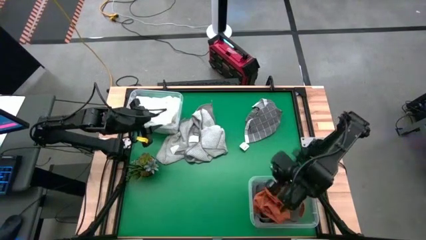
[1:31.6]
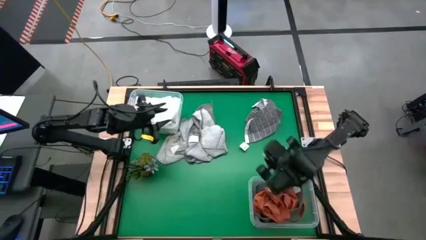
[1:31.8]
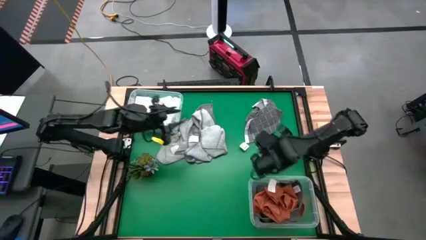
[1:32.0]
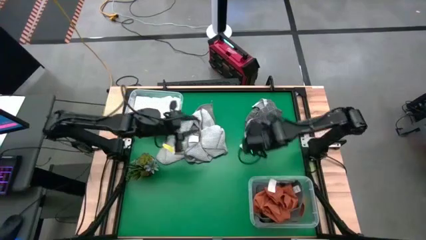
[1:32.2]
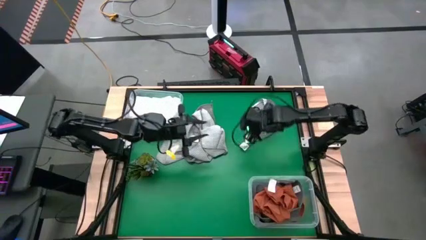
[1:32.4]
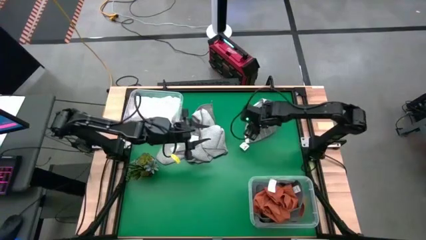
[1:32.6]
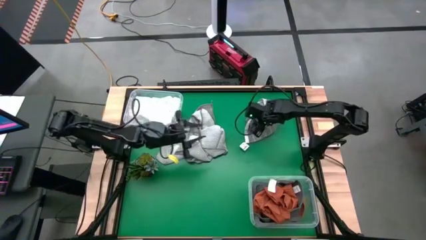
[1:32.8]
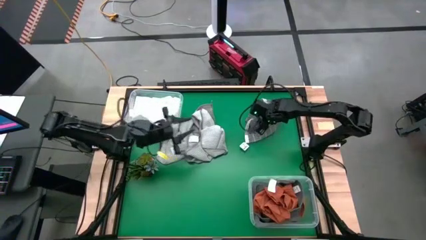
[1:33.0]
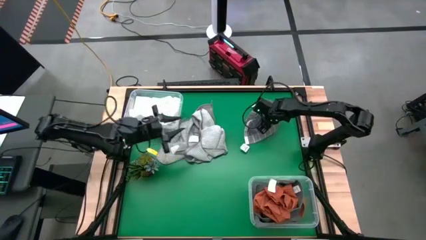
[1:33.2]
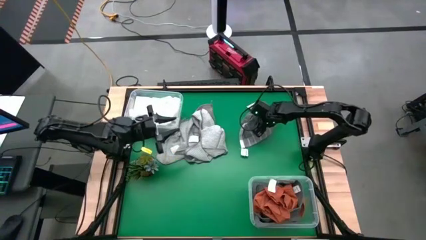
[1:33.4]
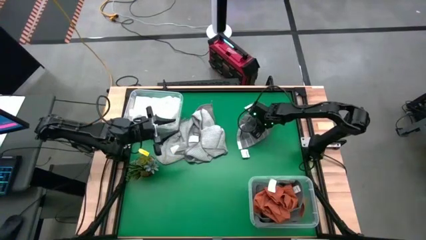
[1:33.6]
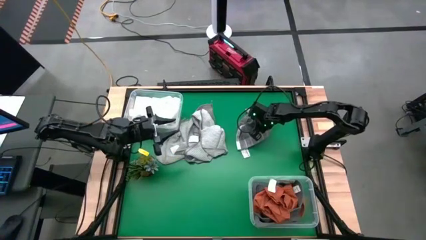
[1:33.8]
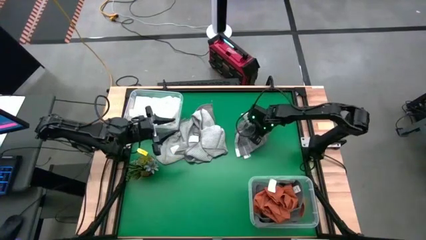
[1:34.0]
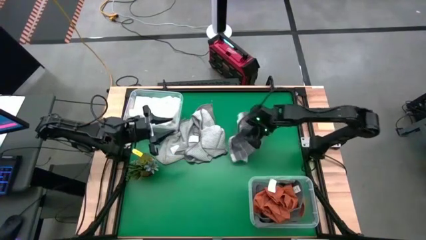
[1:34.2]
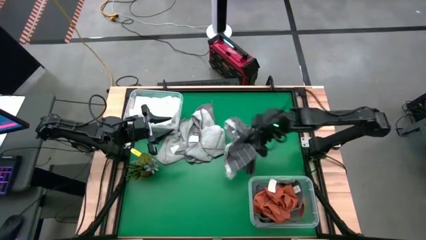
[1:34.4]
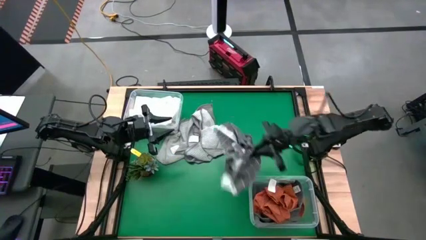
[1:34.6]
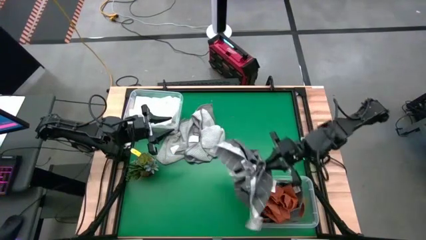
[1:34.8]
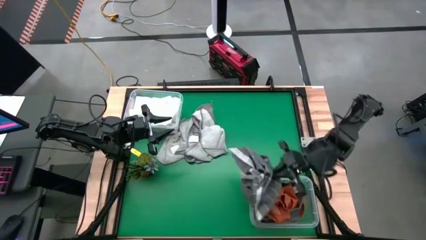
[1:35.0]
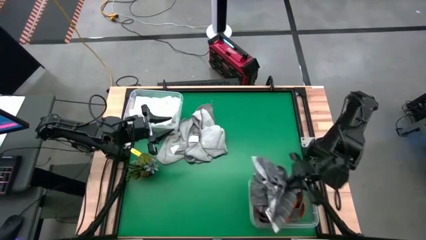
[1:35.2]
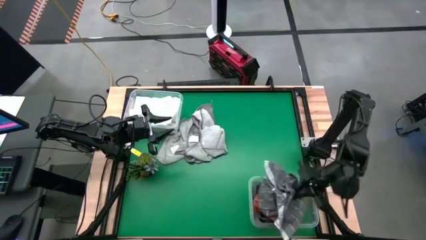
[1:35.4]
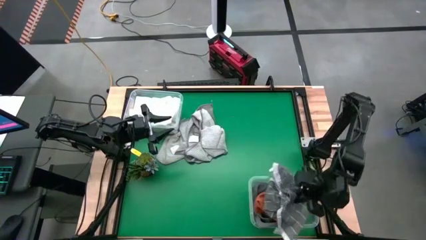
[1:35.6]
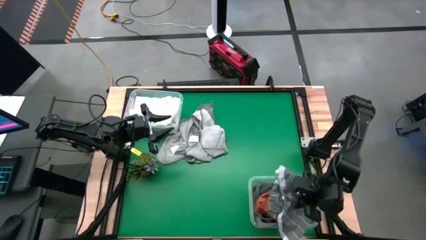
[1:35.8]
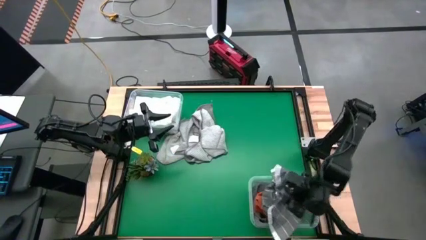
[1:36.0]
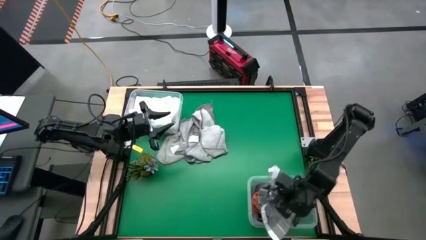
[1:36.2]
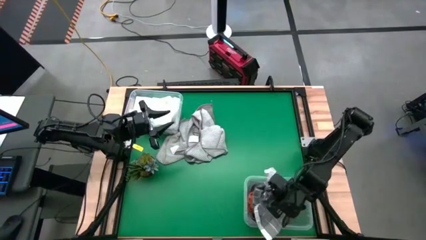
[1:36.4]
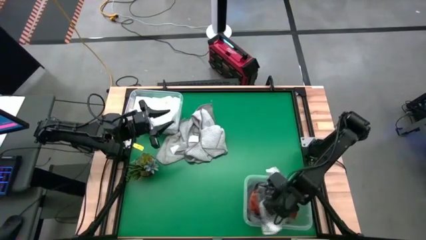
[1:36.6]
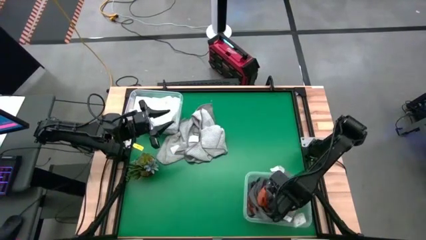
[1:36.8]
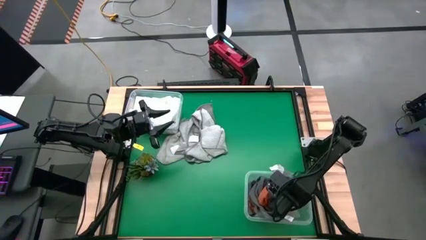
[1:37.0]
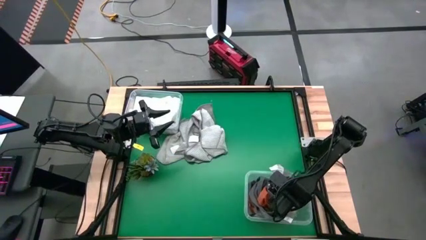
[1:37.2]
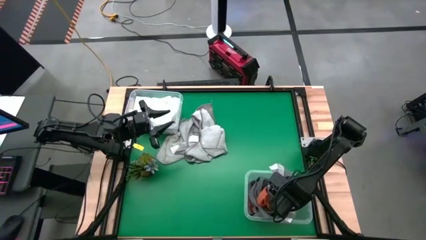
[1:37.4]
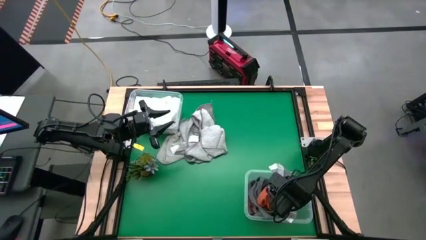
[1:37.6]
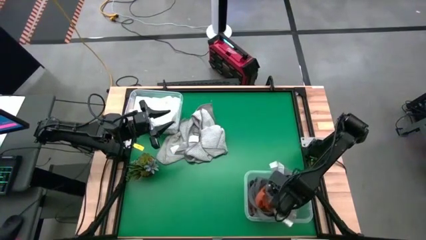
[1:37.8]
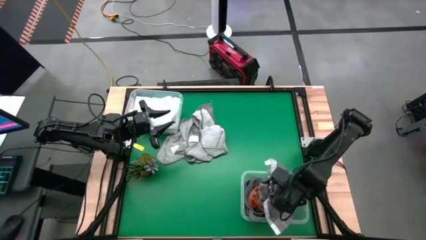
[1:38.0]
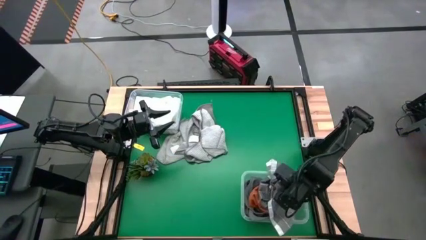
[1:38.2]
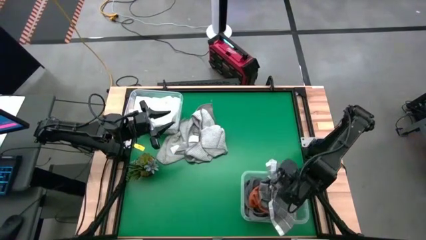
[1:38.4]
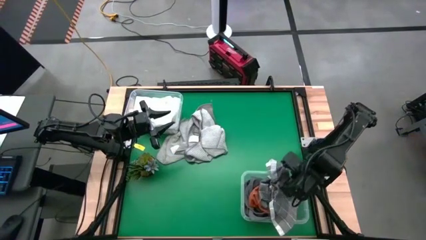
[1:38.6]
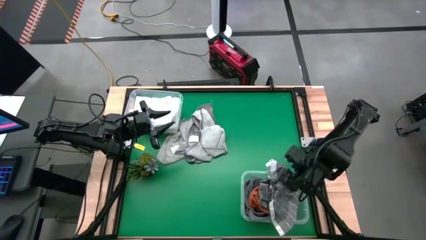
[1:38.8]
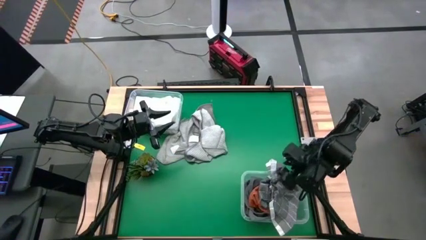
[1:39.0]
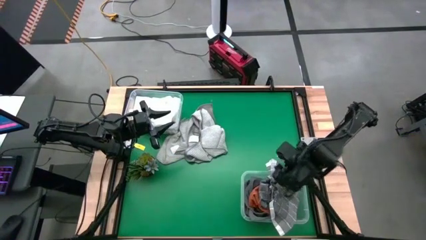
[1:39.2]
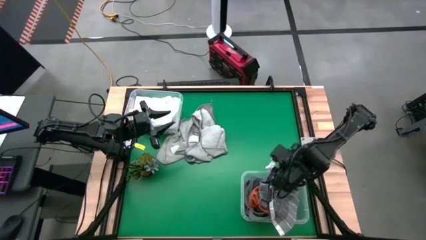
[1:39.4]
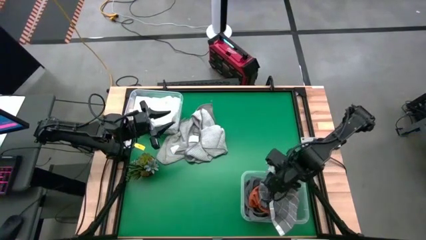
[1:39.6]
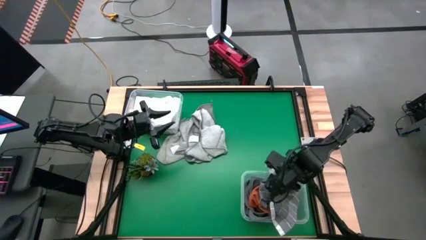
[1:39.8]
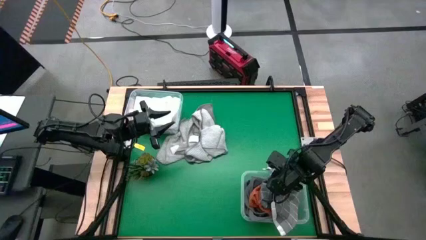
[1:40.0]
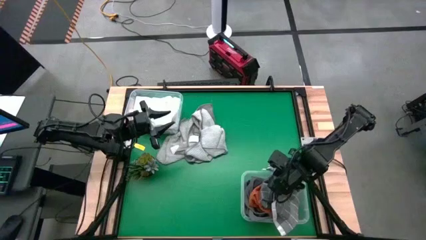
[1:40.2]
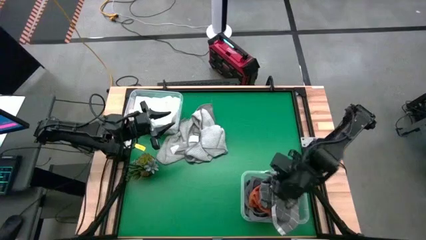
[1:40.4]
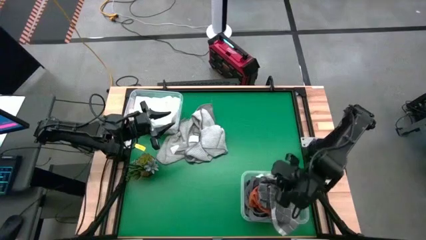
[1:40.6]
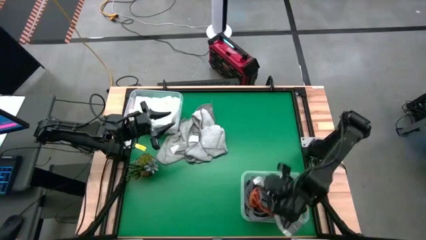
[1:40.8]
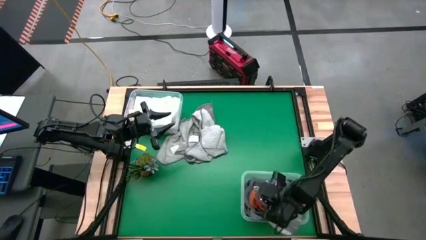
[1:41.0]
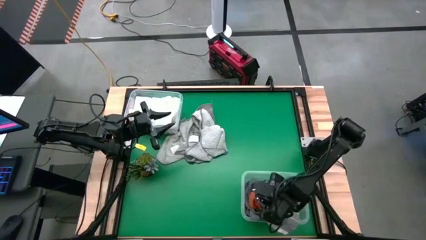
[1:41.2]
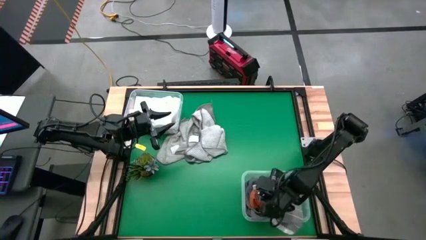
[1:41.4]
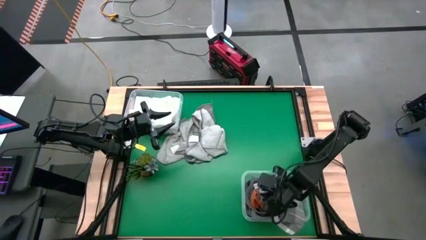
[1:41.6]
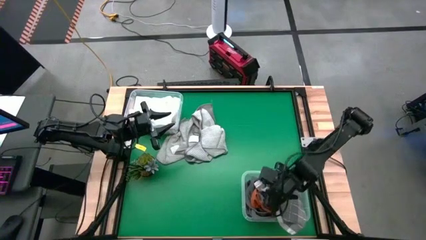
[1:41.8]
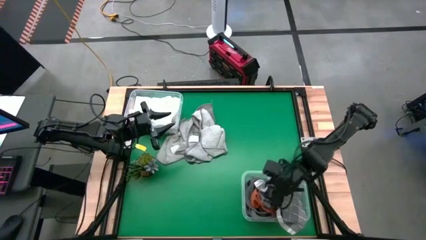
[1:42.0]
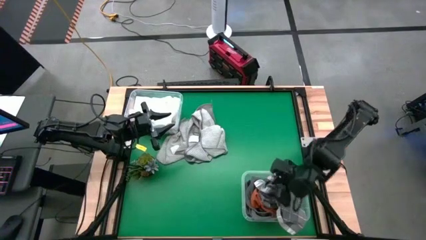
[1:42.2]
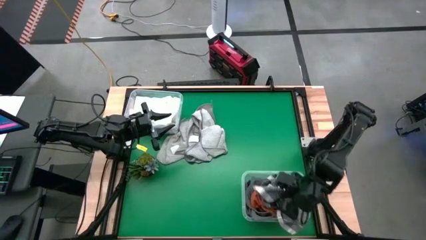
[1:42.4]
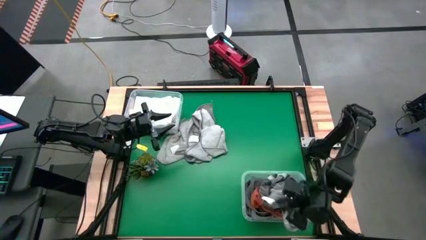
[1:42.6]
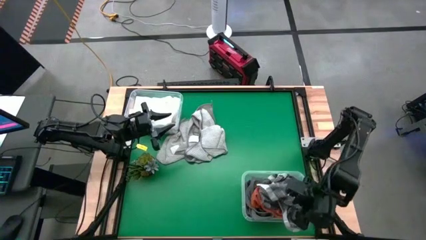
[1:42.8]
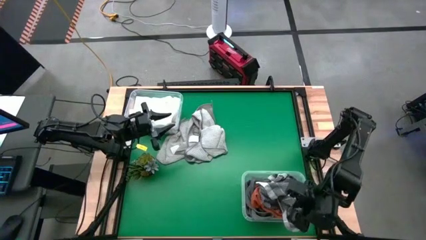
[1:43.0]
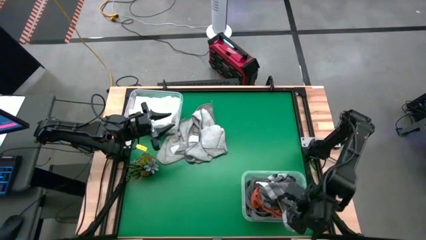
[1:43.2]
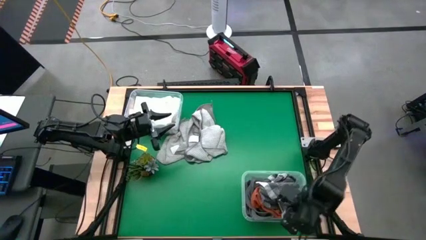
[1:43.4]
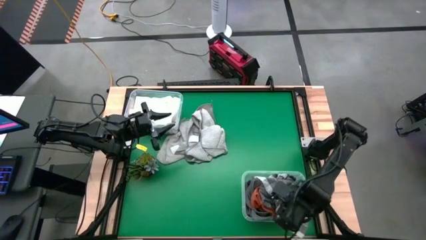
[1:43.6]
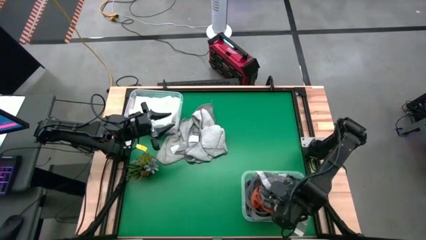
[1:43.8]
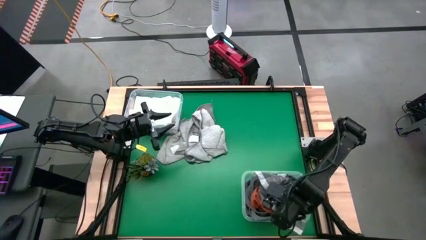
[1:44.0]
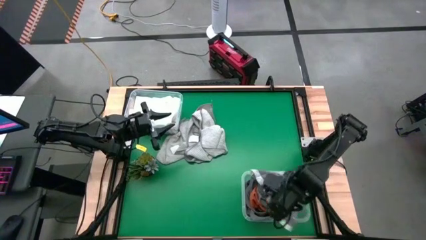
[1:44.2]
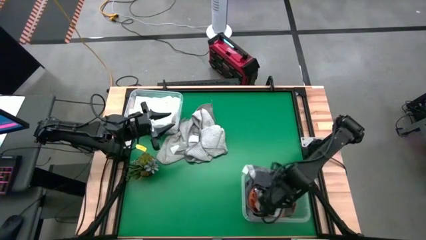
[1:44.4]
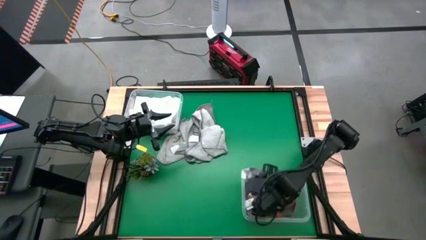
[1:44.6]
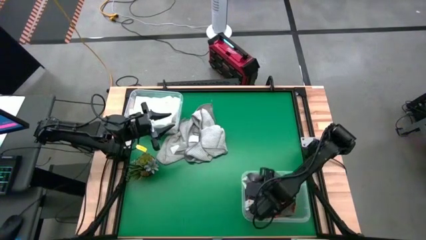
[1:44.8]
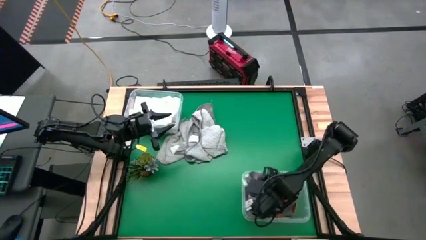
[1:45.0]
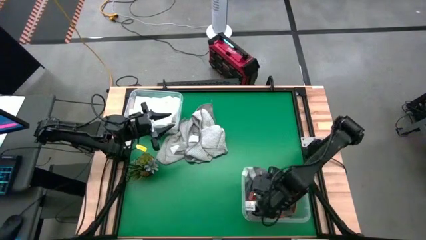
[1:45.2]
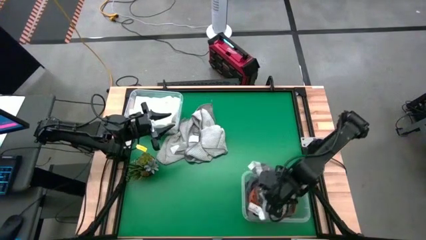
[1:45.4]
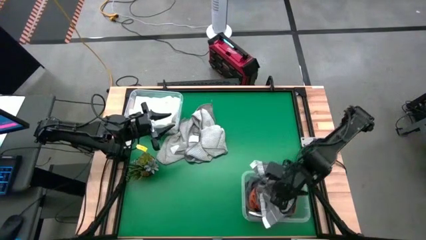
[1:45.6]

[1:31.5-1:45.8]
Task: Sort towels by color in basket
Put the gray checkered towel into the bottom transparent bin
